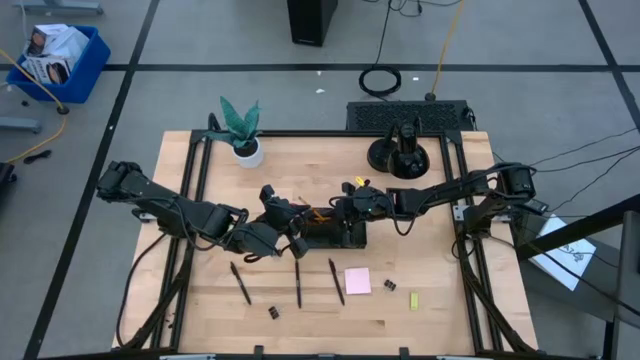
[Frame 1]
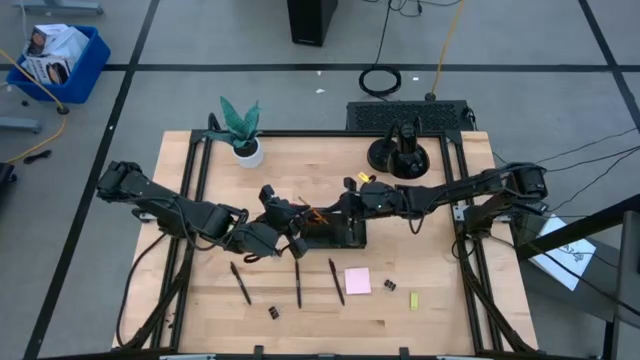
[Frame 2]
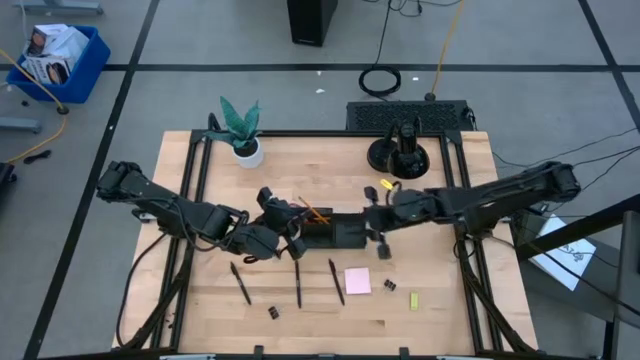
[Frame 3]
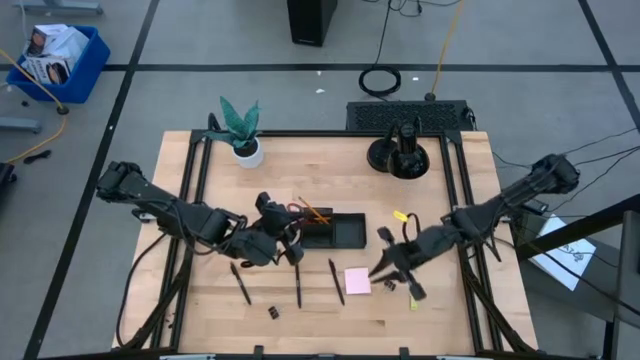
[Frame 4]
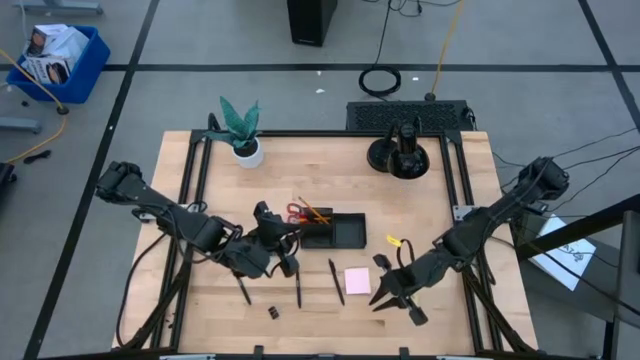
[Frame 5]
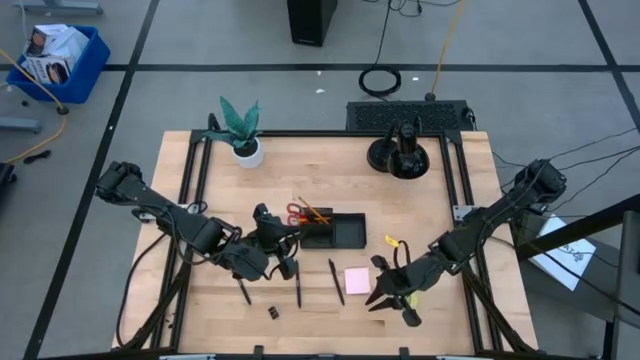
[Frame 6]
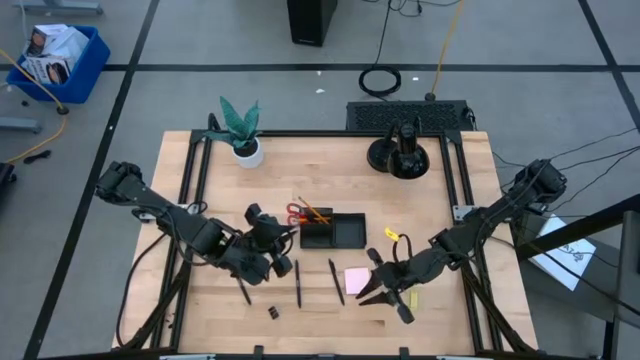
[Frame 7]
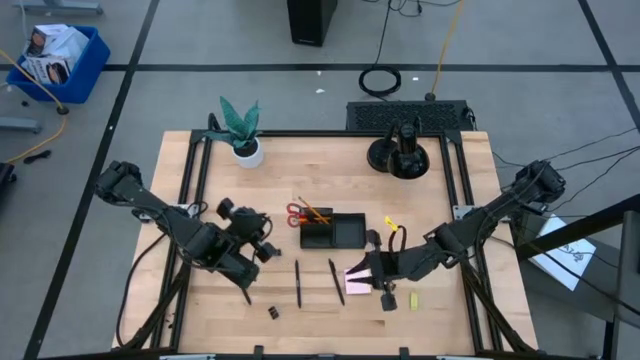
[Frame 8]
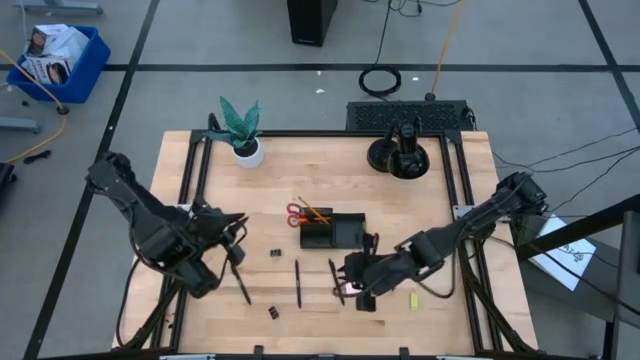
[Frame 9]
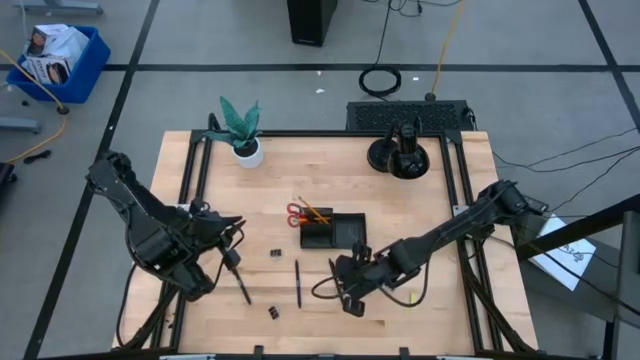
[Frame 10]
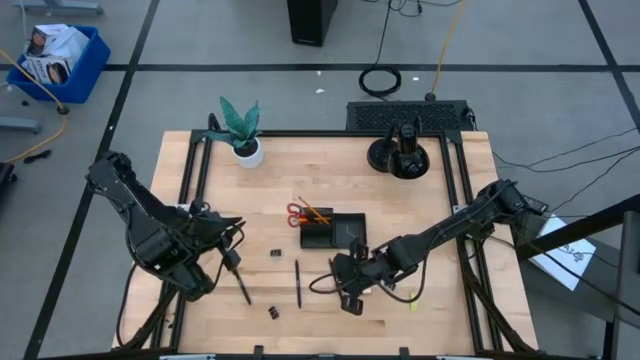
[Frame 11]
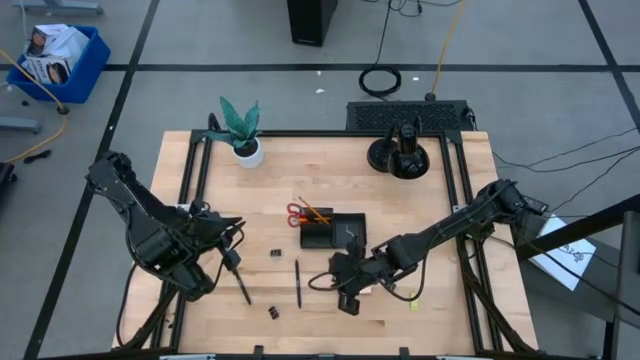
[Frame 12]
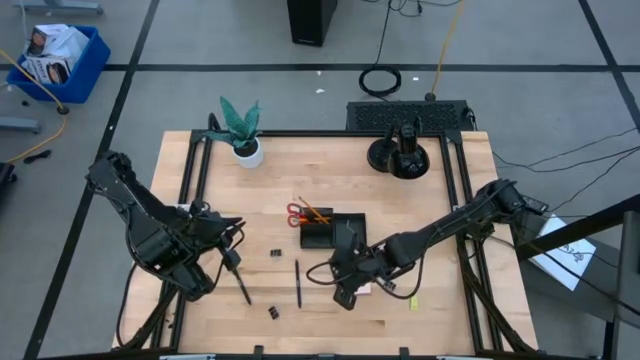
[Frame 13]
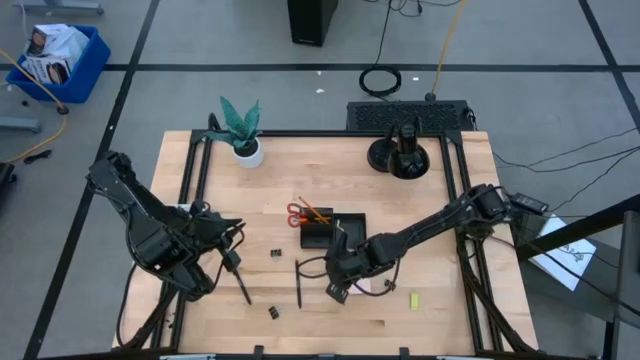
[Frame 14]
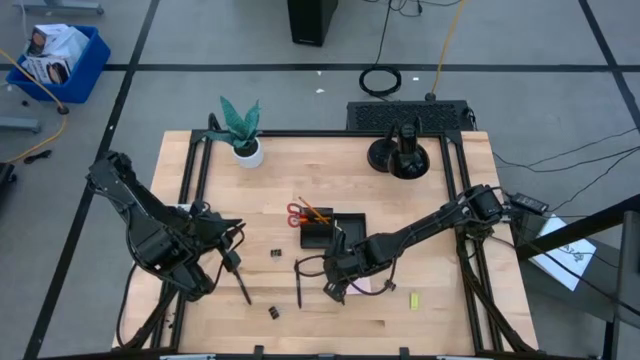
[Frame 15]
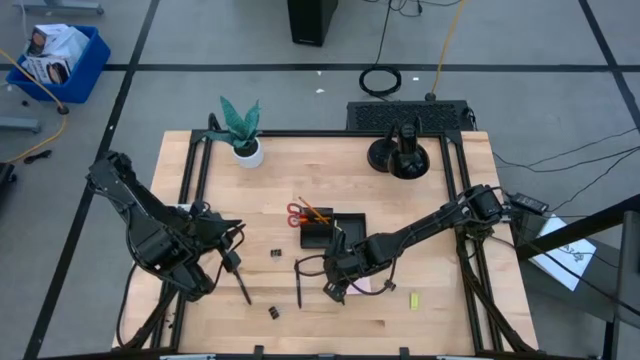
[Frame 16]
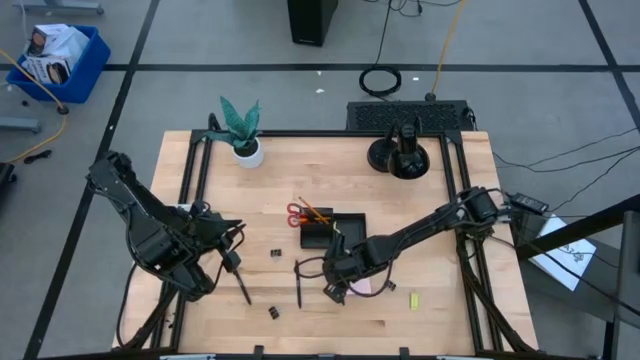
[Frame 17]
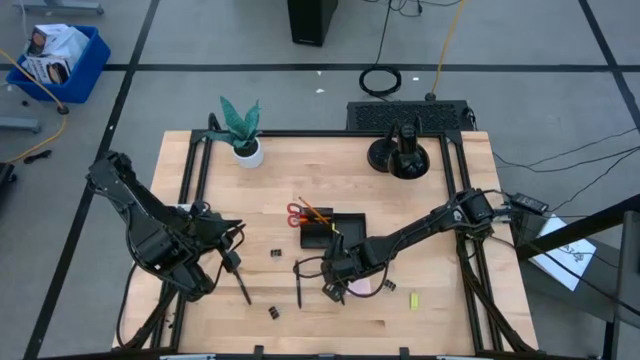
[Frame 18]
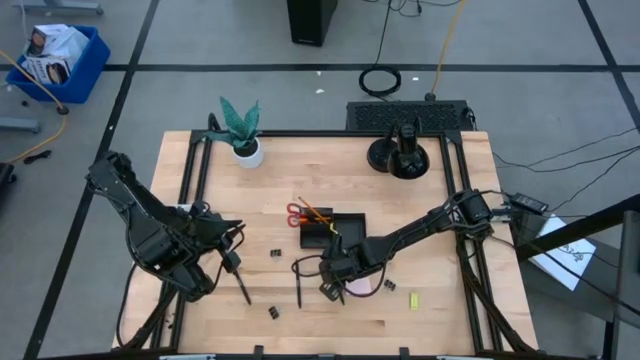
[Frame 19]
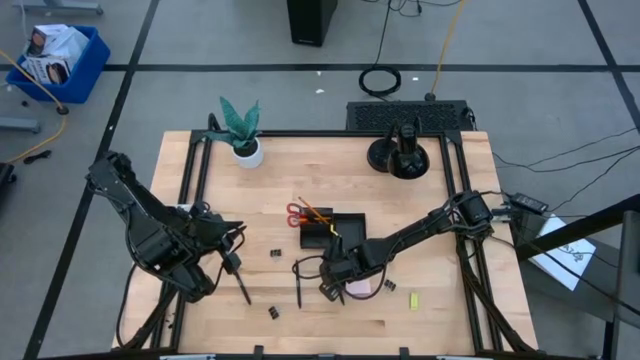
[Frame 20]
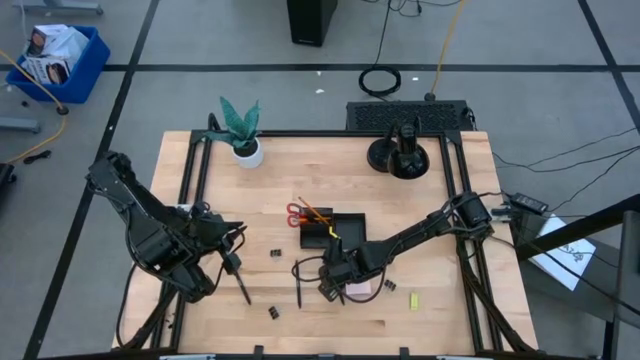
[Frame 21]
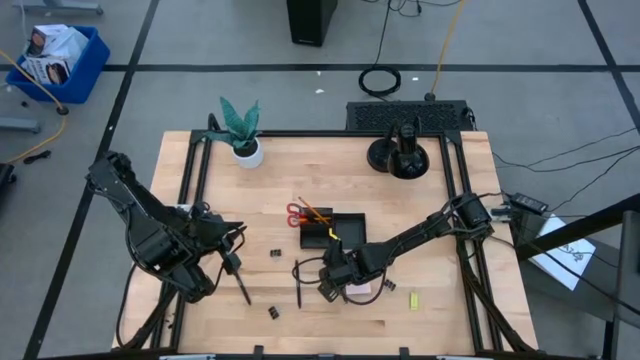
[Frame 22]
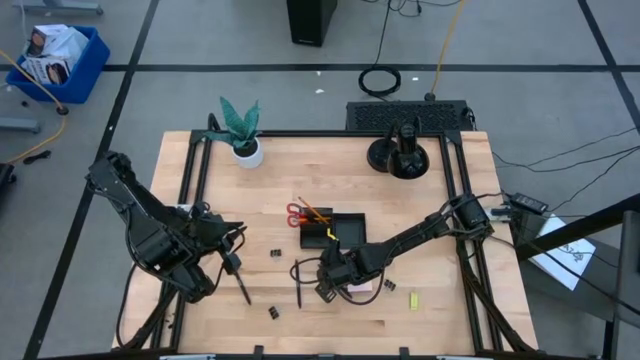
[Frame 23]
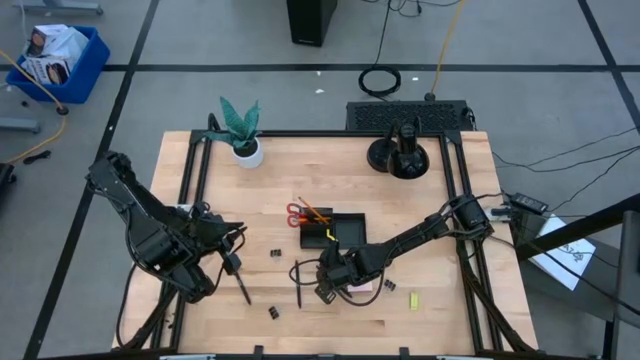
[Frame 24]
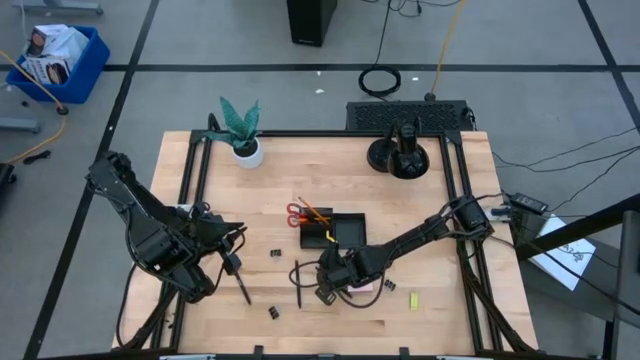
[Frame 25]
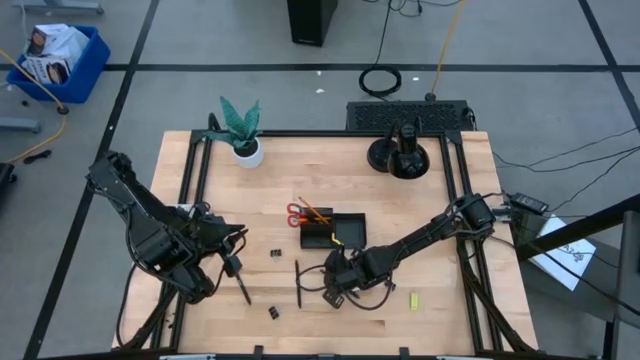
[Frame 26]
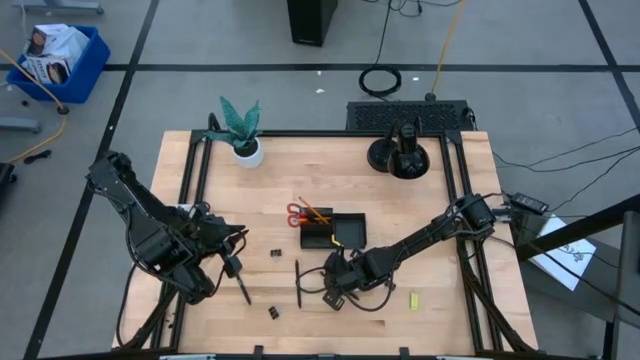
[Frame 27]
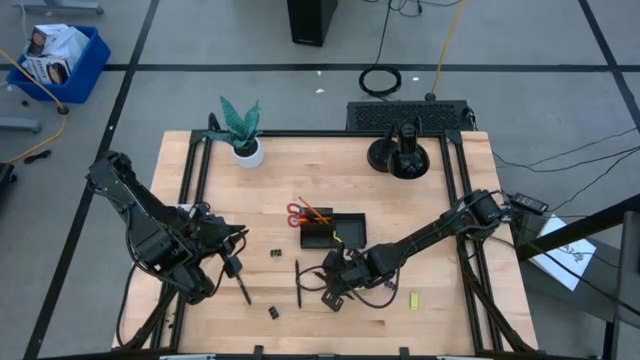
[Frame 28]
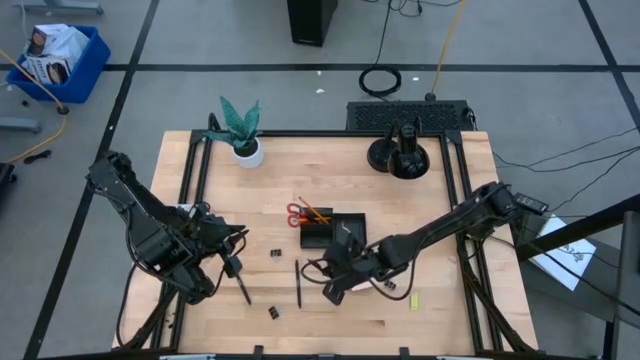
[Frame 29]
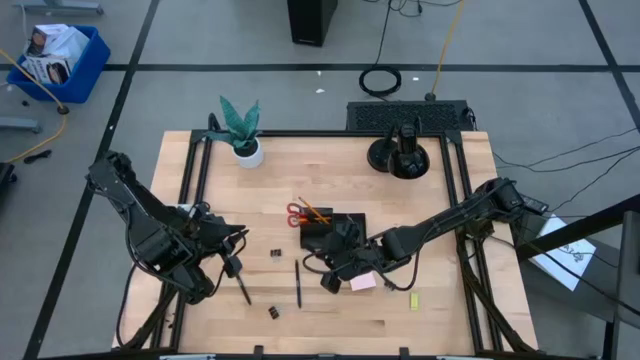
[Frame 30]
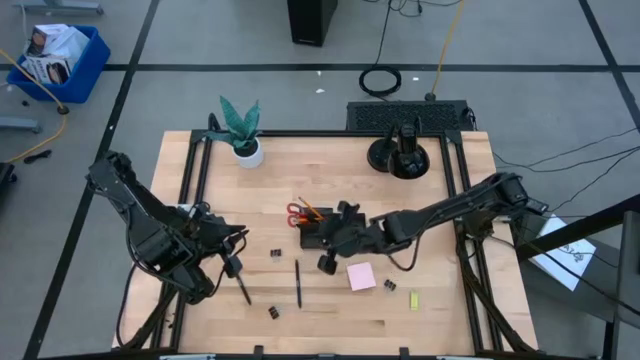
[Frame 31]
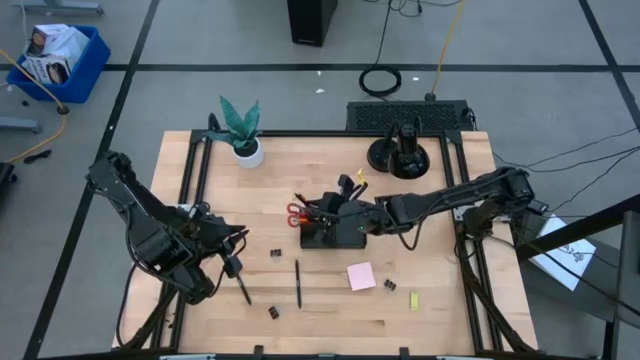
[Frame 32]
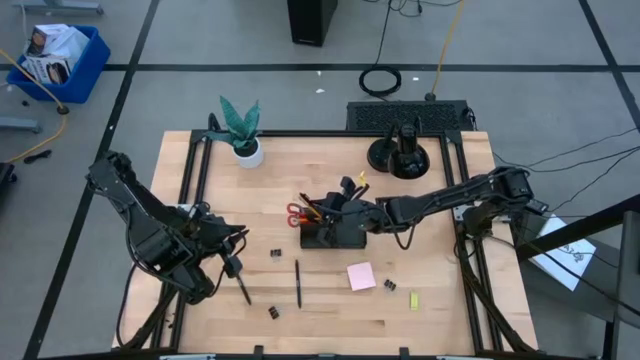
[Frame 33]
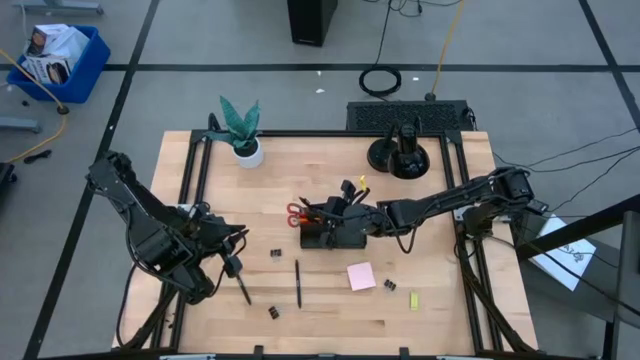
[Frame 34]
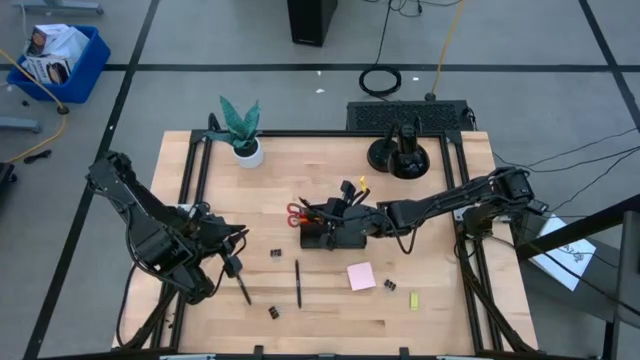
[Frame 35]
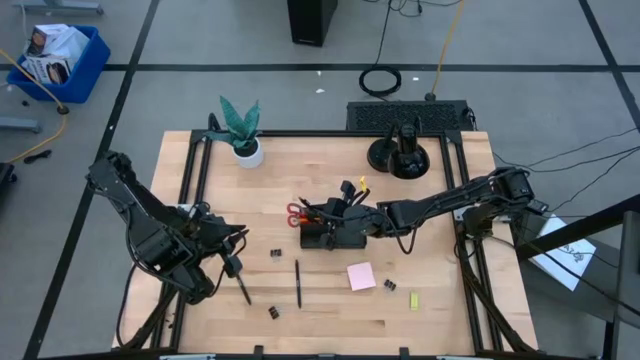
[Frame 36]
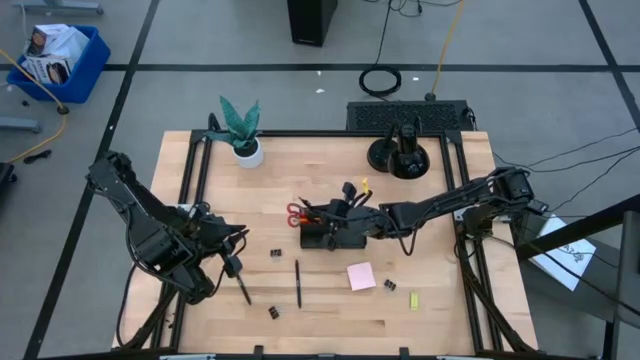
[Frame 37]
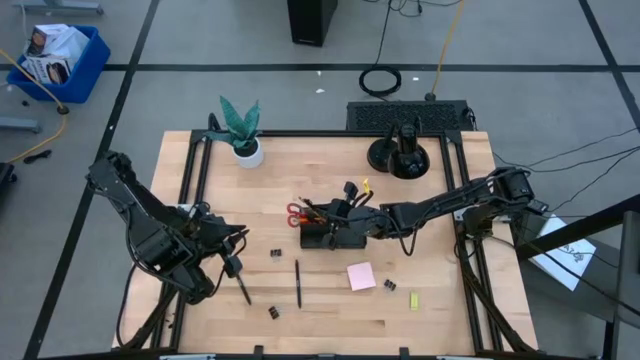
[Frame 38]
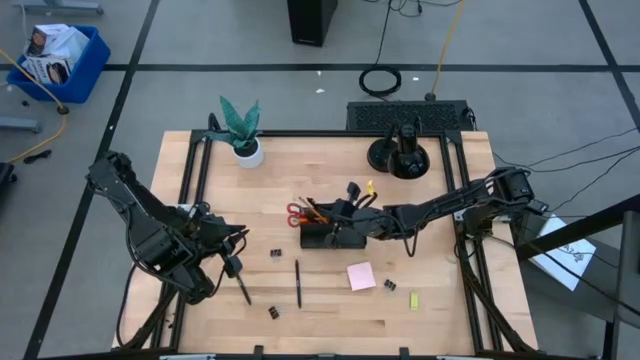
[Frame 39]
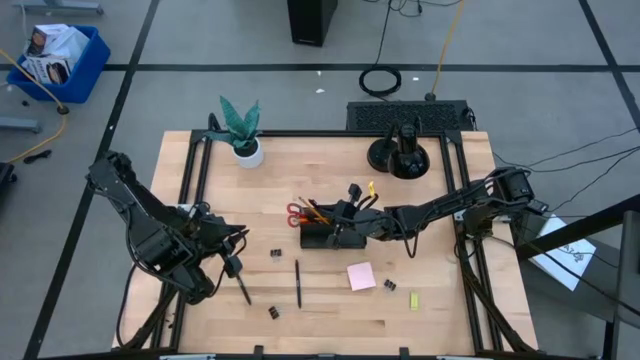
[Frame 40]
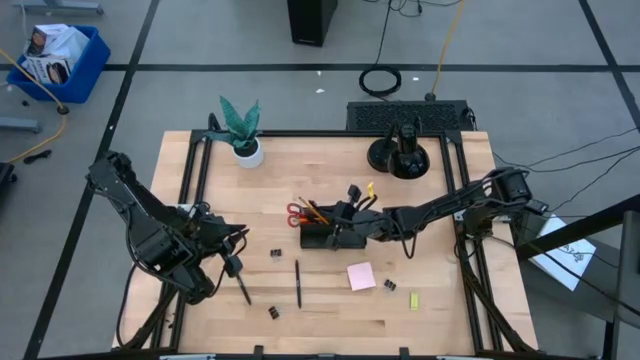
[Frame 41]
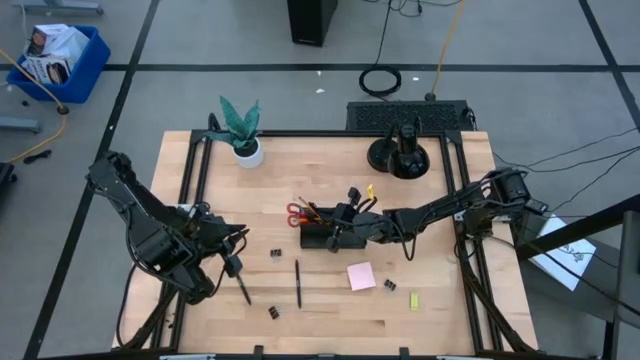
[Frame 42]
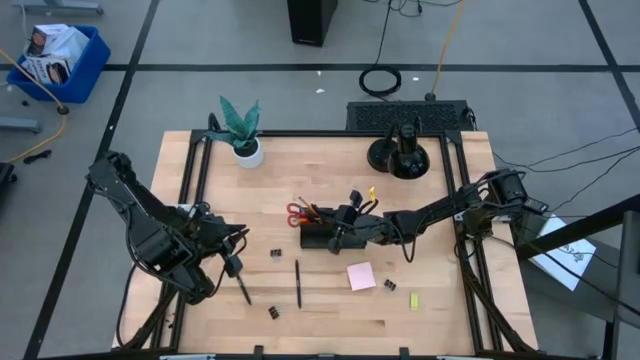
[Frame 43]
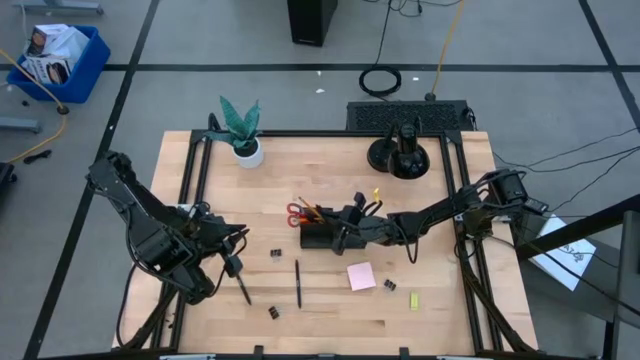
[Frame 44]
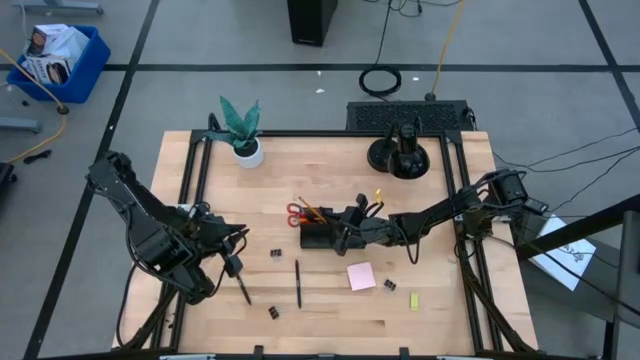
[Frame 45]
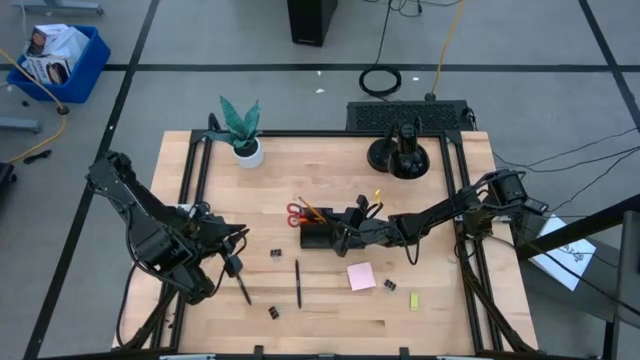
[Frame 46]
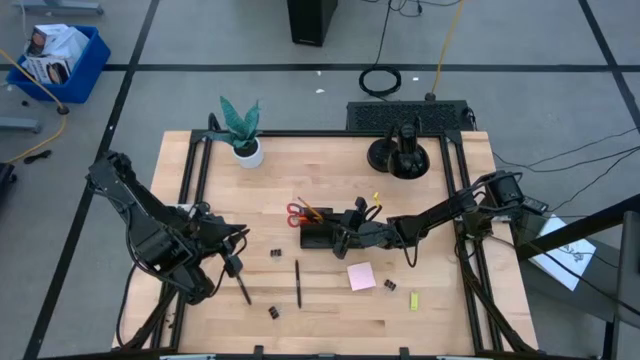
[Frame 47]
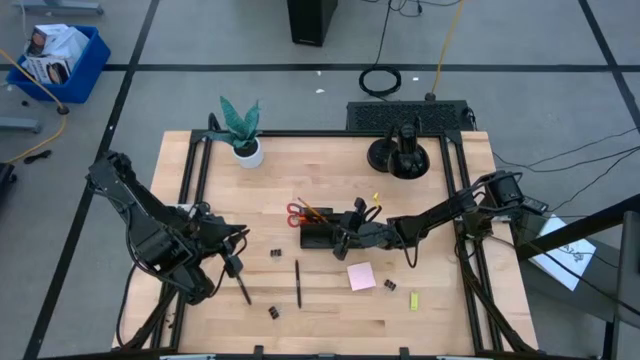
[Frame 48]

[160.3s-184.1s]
Task: Pick and place office supplies into organizer
Put the right black pen into the desk organizer
